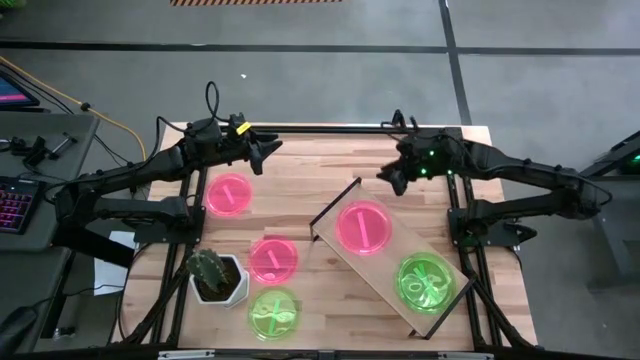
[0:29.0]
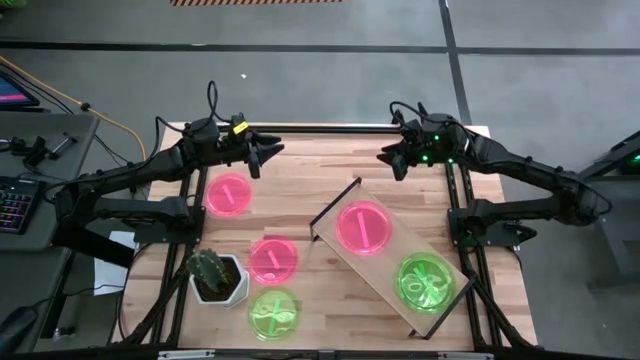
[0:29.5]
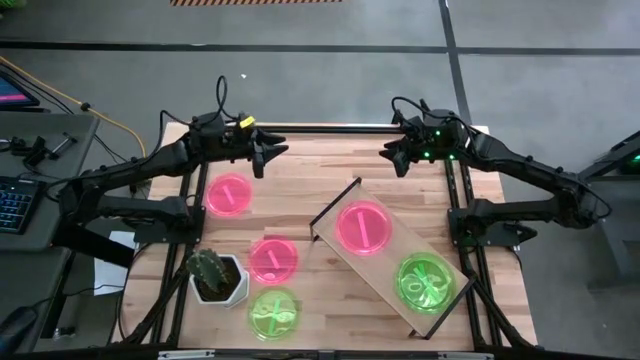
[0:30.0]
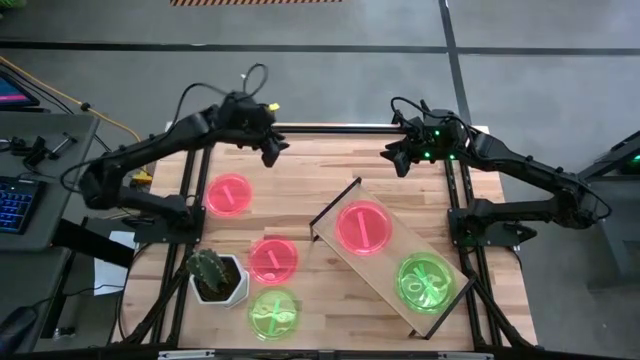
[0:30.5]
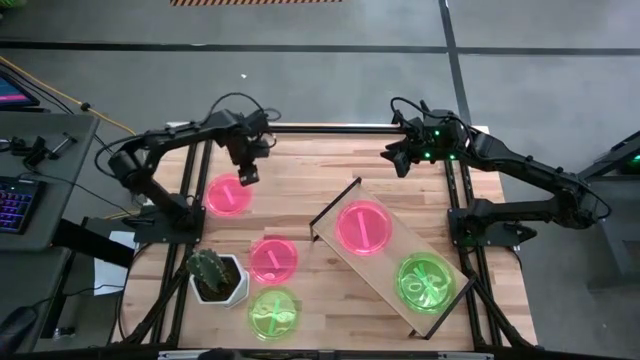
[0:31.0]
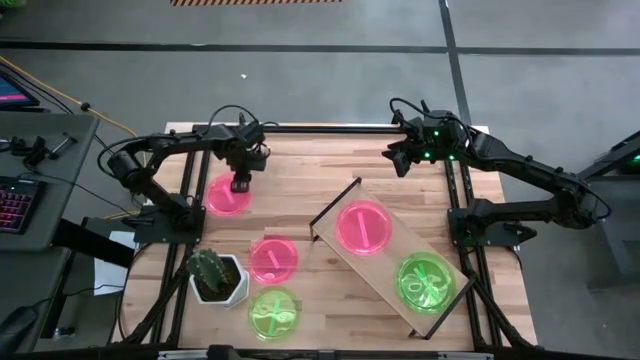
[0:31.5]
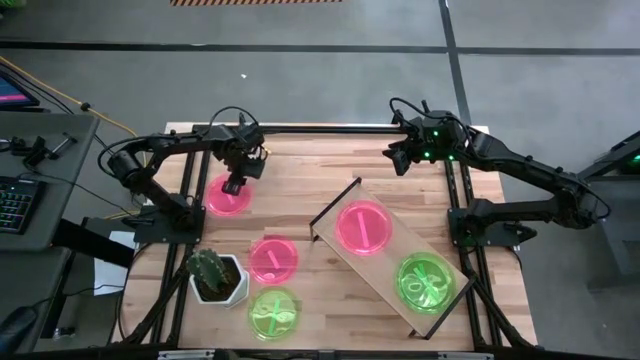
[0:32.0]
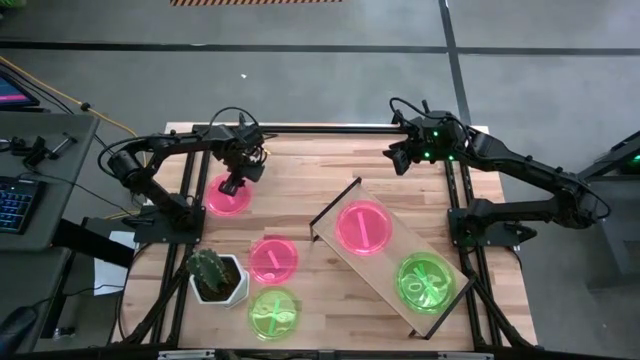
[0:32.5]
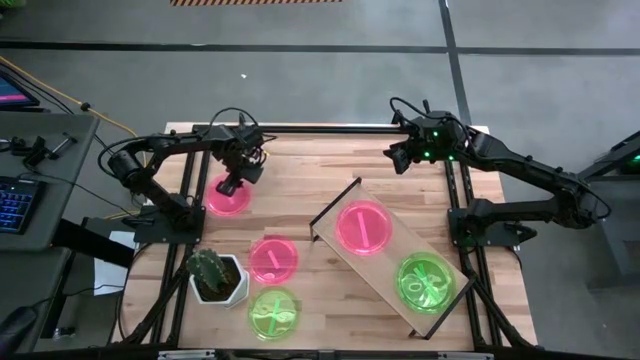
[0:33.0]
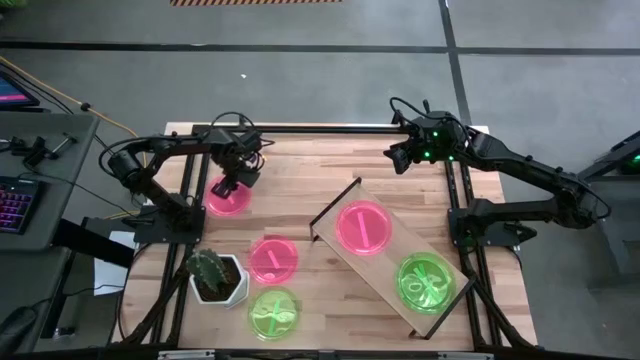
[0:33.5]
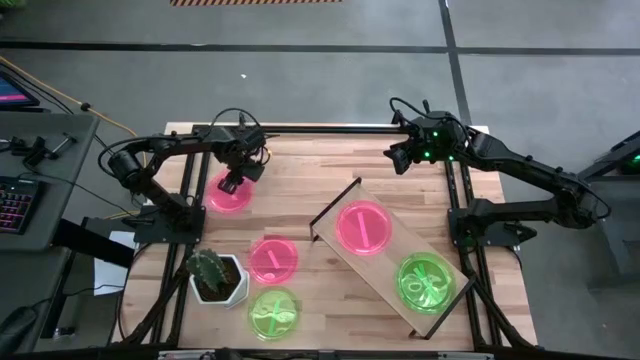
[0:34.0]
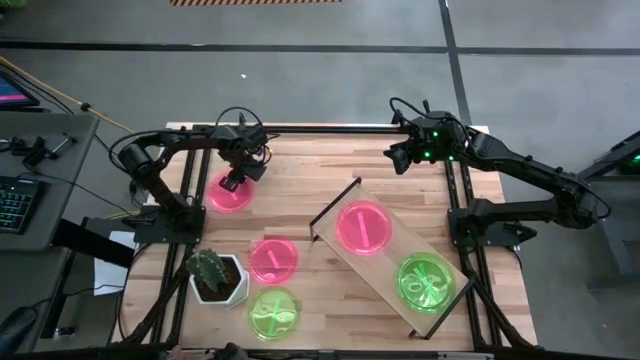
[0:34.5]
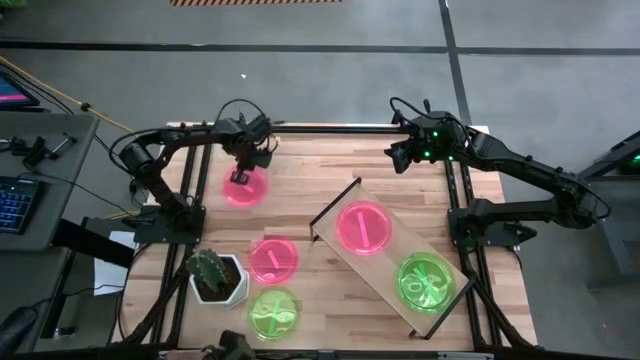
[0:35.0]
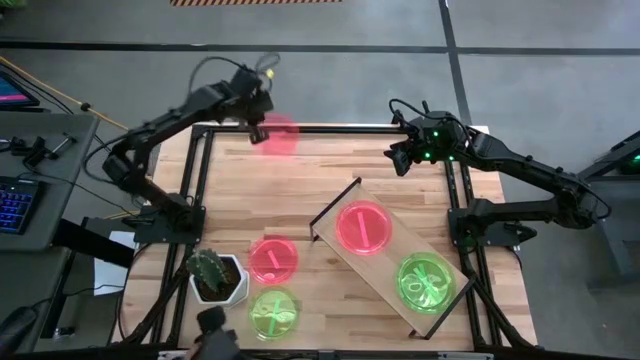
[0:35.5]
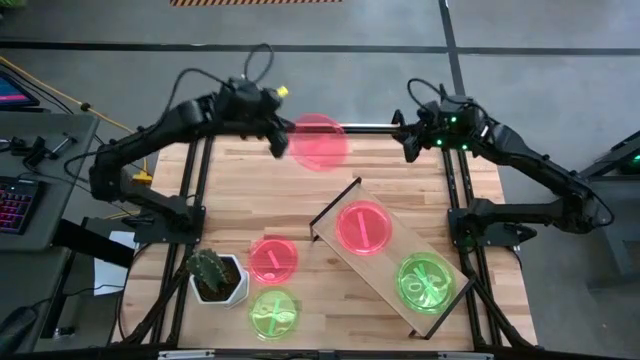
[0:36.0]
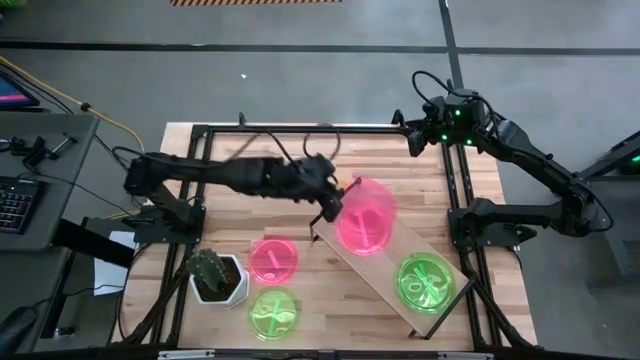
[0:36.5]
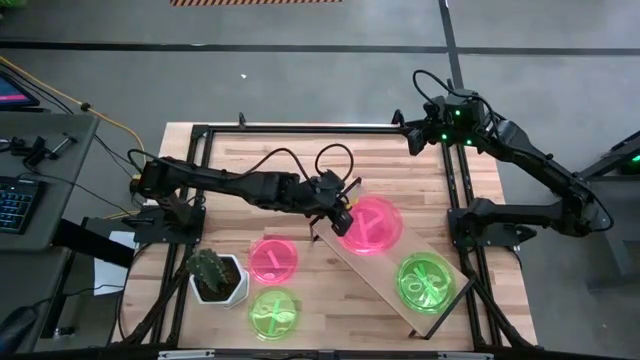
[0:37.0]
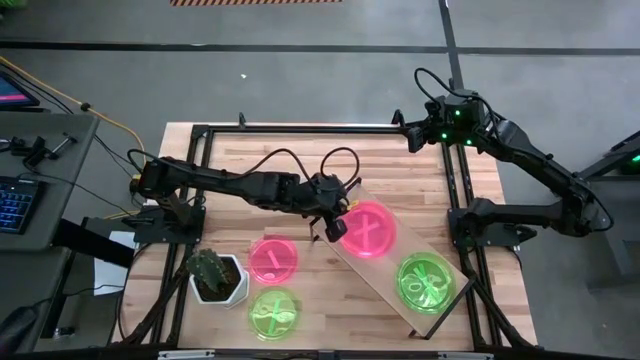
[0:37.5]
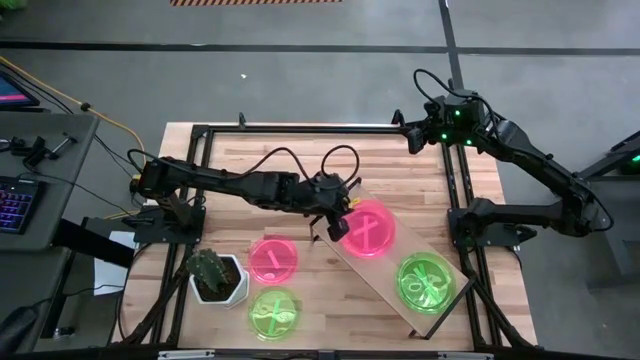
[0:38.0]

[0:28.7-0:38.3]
Task: Place and stack plates onto a shelf
Stack the top pink plate on top of the pink plate on the shelf

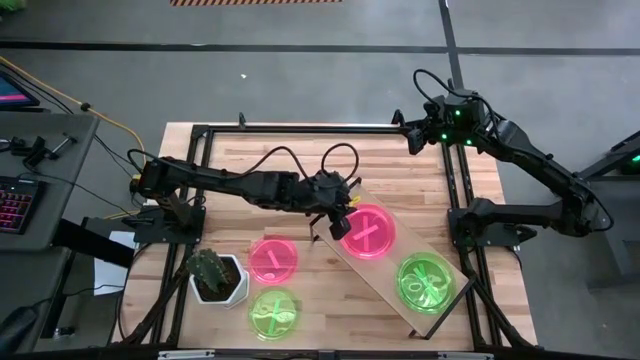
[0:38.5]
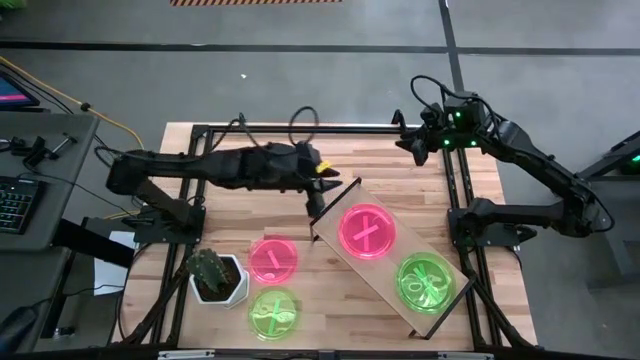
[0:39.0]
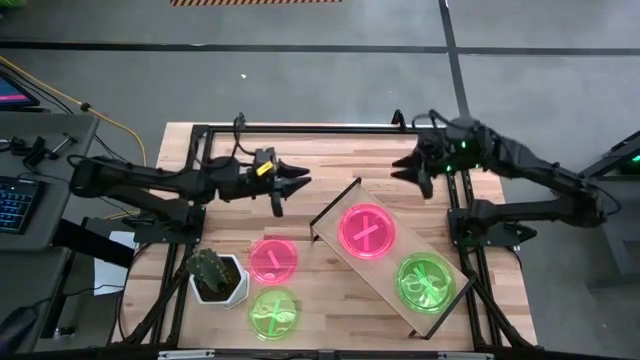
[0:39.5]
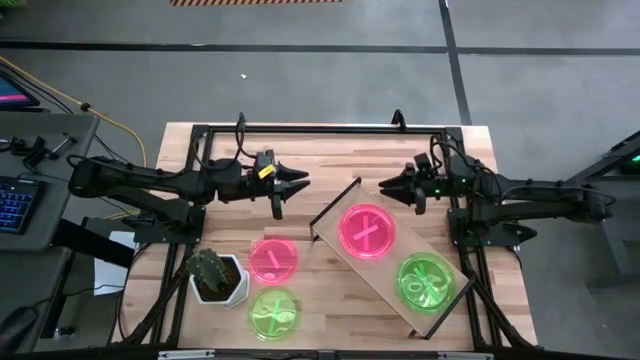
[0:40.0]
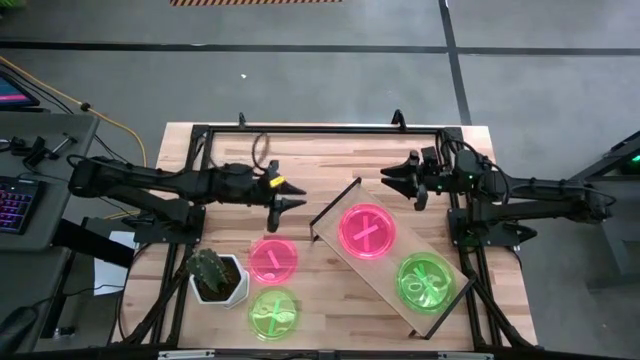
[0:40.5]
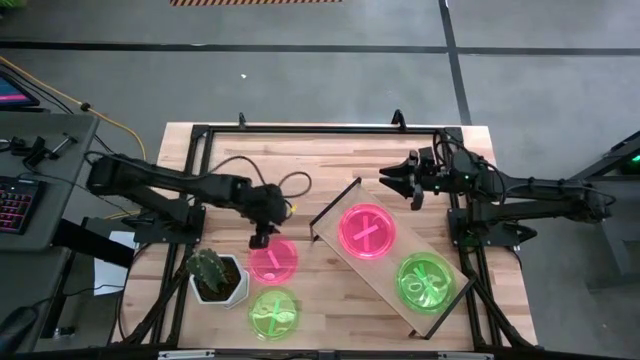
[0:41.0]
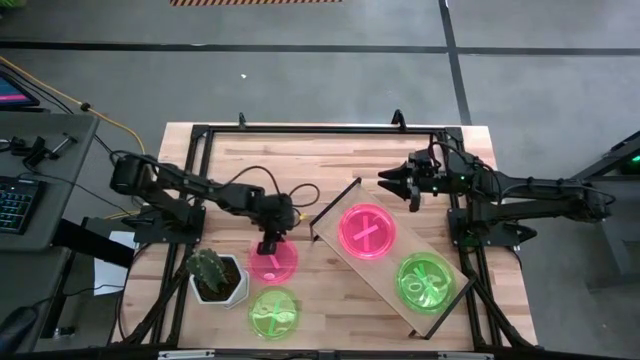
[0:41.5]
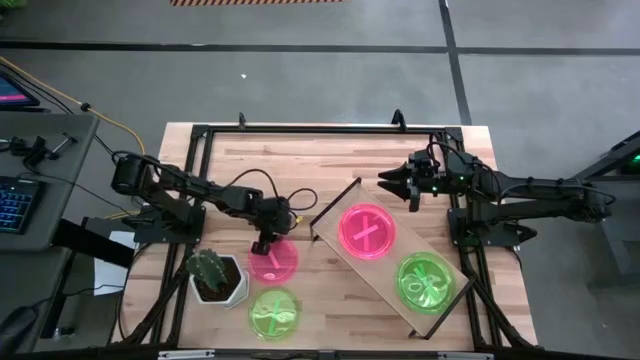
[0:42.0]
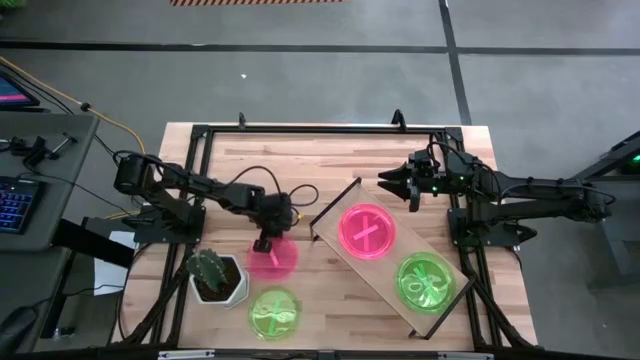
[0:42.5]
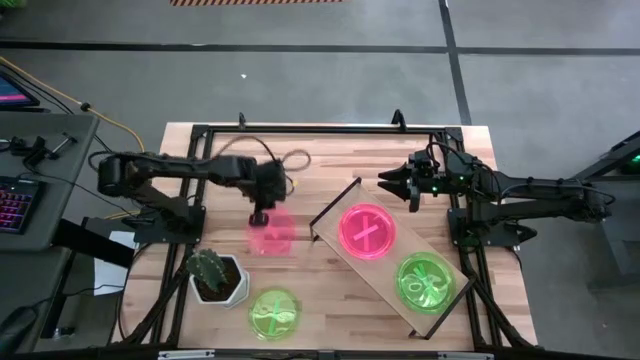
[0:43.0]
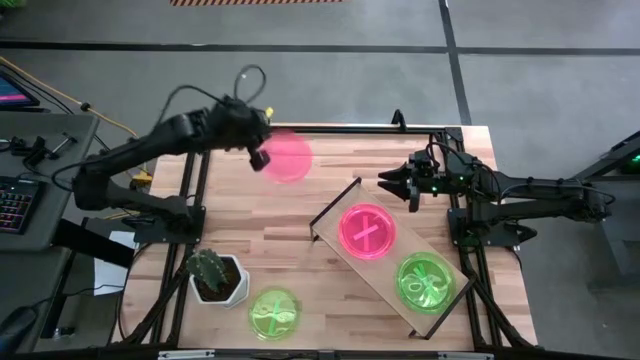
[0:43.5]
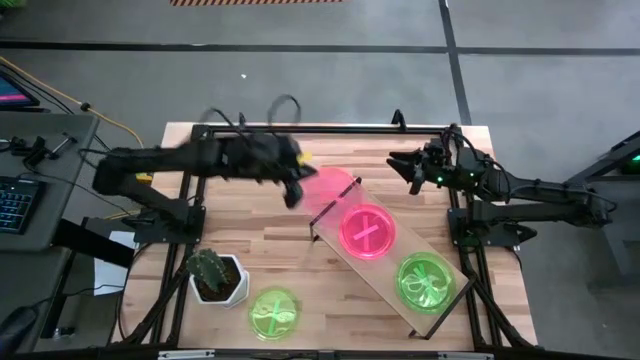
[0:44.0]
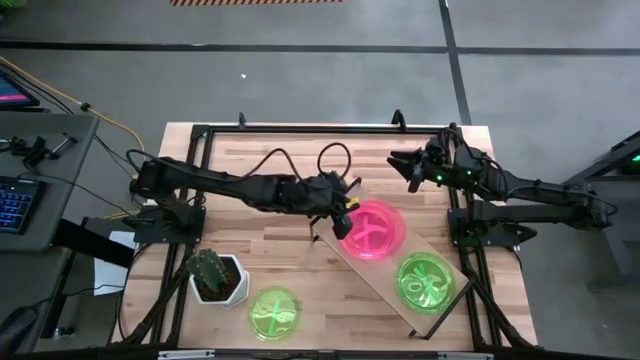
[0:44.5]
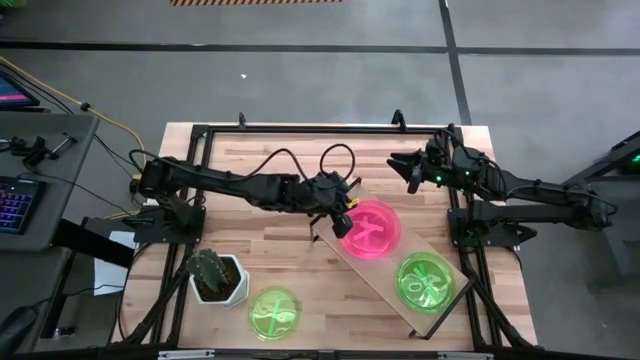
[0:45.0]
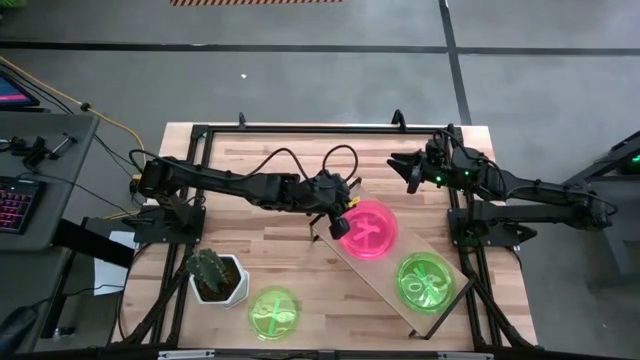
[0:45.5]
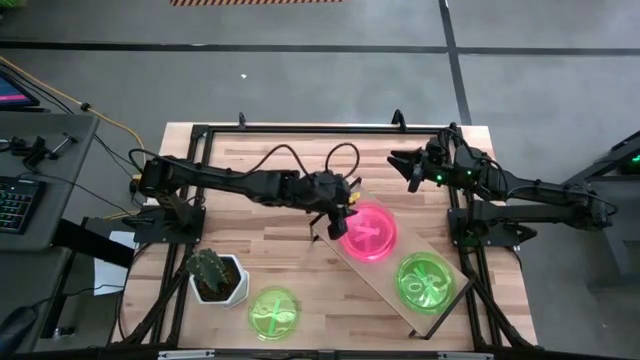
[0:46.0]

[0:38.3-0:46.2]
Stack the pink plate on top of the pink plate on the shelf

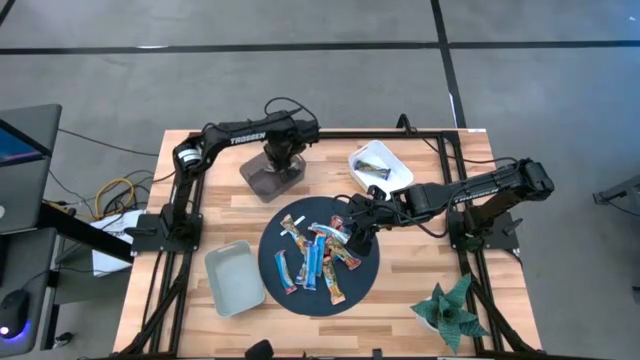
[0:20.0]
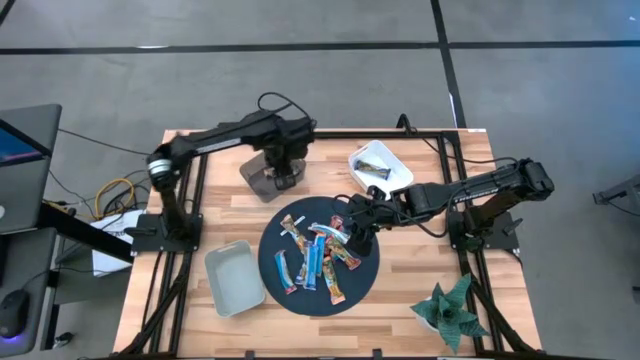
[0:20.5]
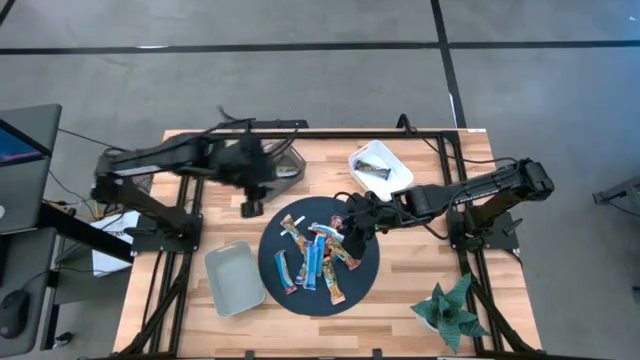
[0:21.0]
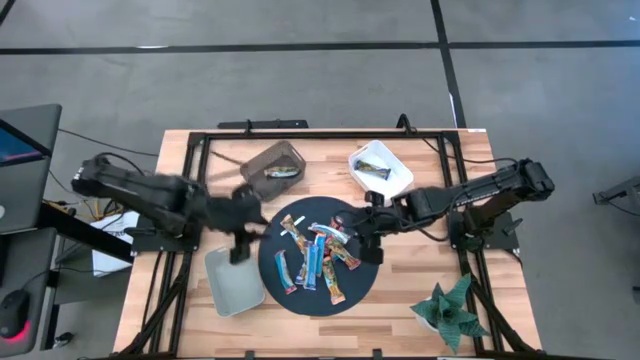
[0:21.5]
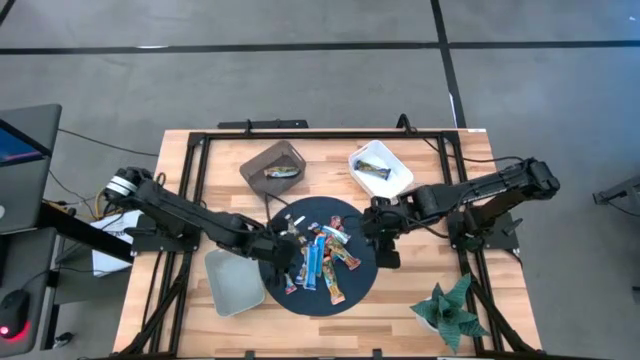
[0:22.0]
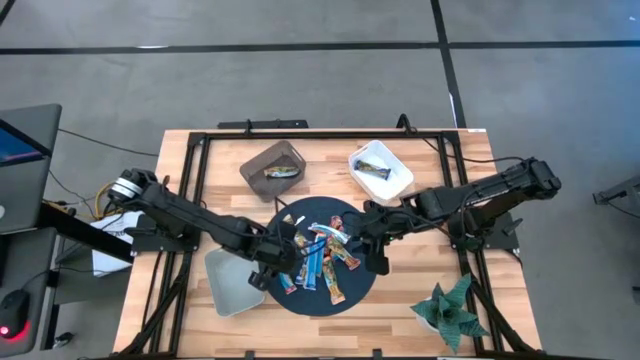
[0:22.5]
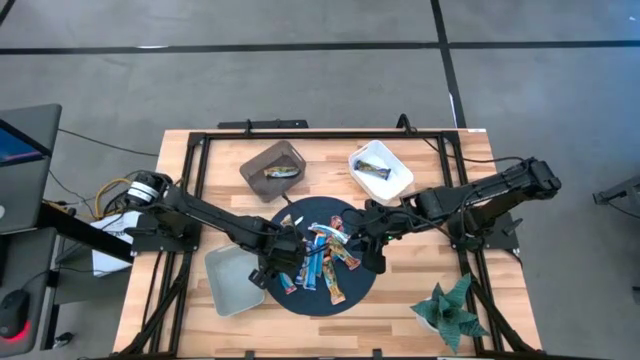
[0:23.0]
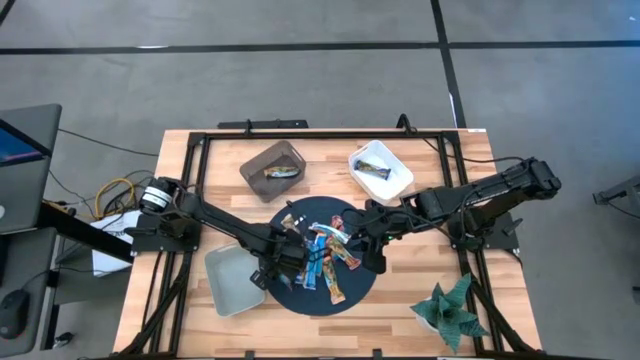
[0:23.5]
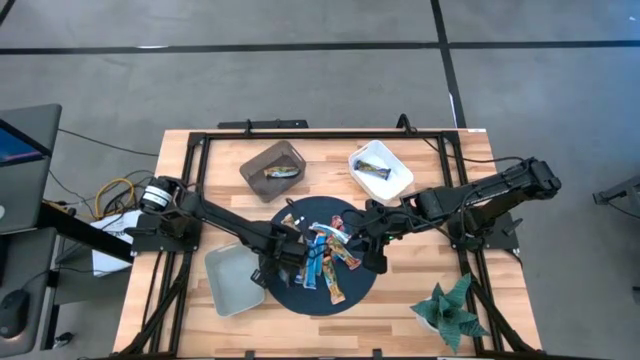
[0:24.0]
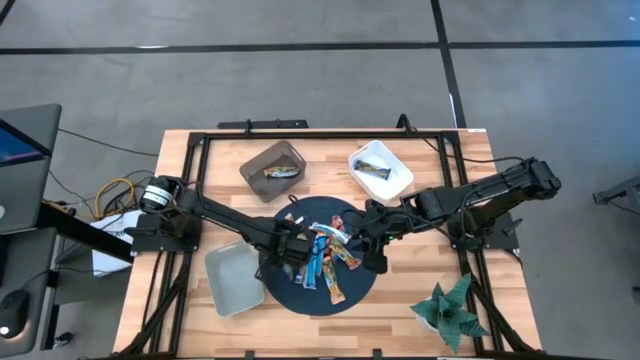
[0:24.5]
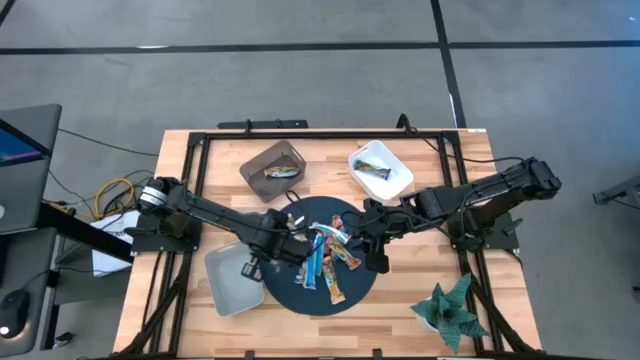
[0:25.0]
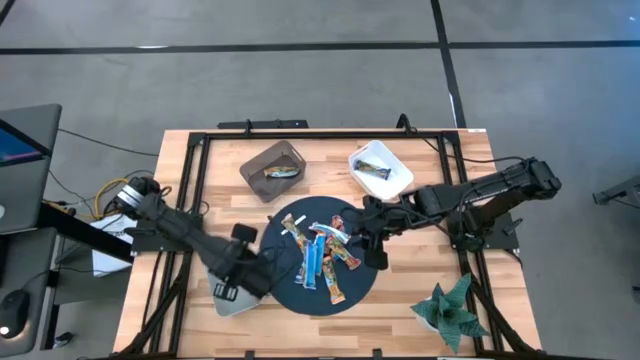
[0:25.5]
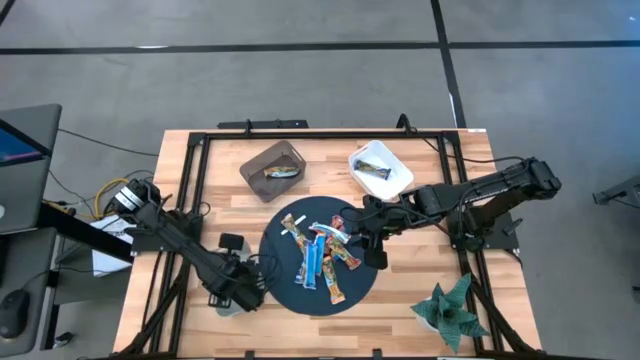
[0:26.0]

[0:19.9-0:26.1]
Task: Pick and place Granola Bars by type
Put the red granola bar into the gray bin
